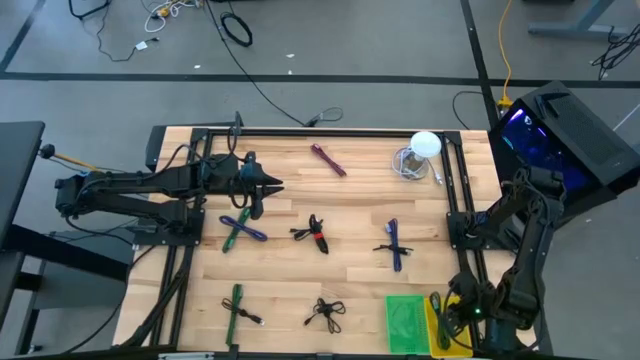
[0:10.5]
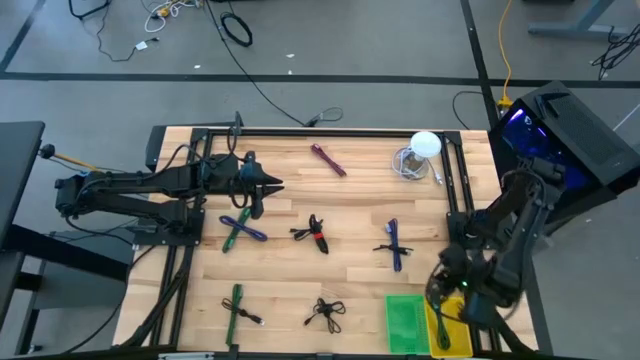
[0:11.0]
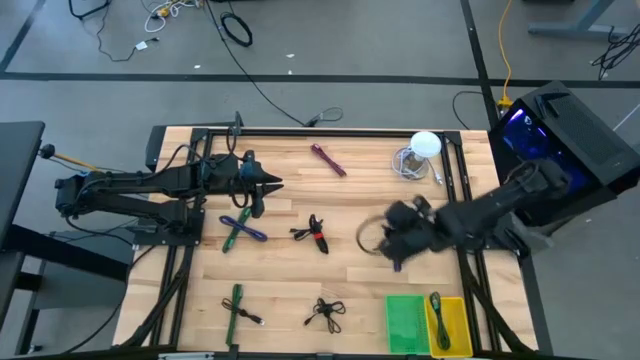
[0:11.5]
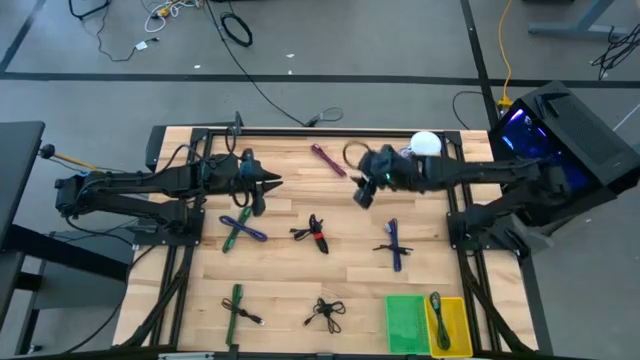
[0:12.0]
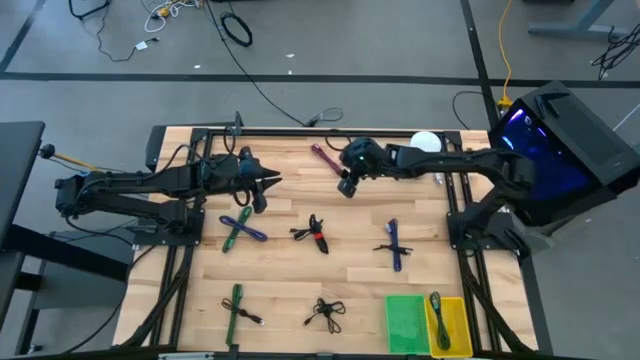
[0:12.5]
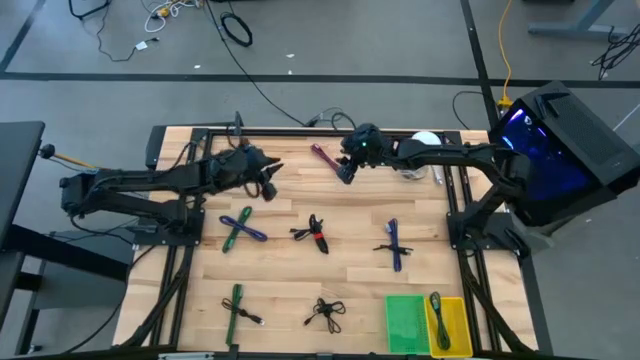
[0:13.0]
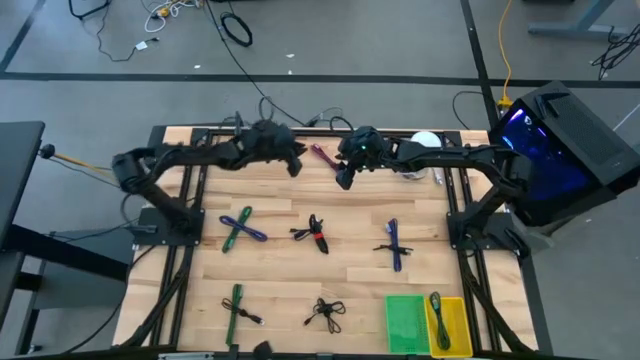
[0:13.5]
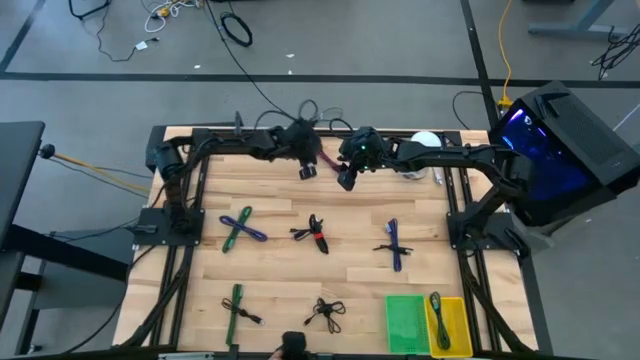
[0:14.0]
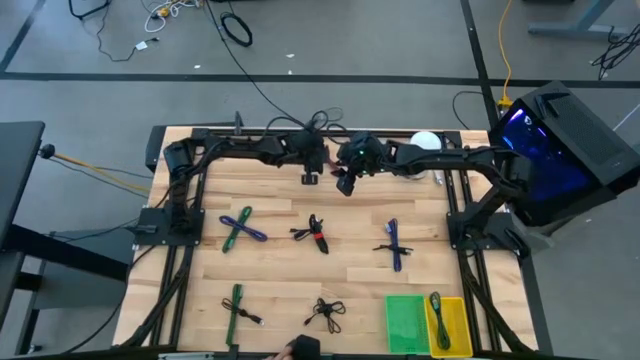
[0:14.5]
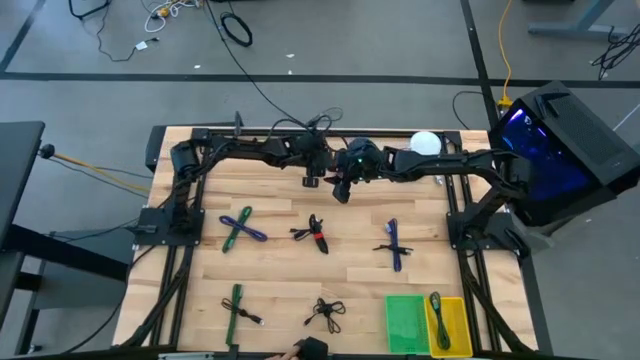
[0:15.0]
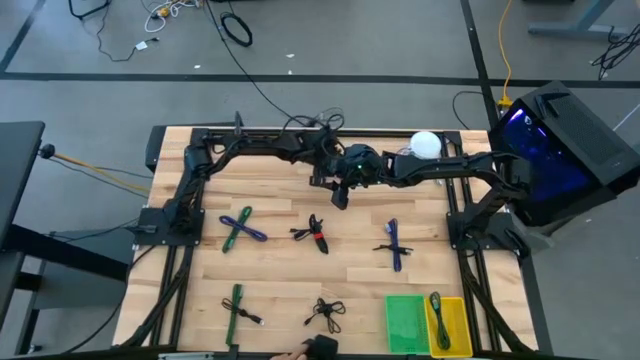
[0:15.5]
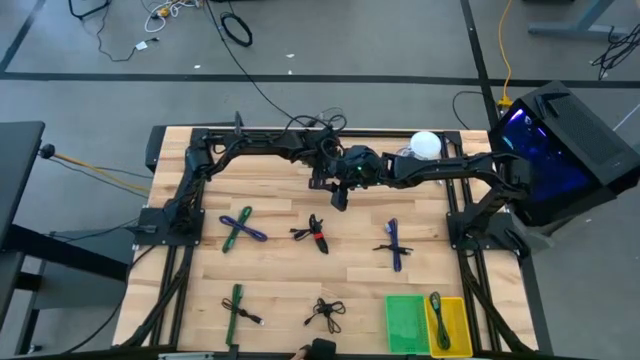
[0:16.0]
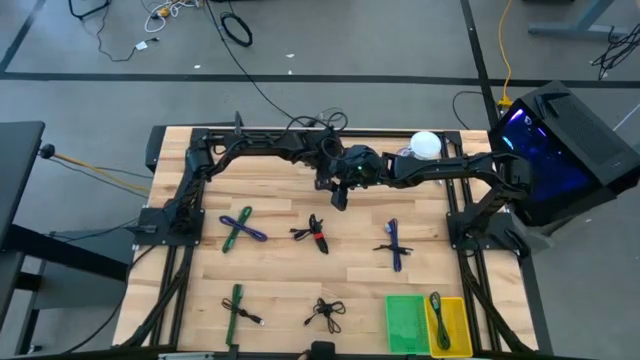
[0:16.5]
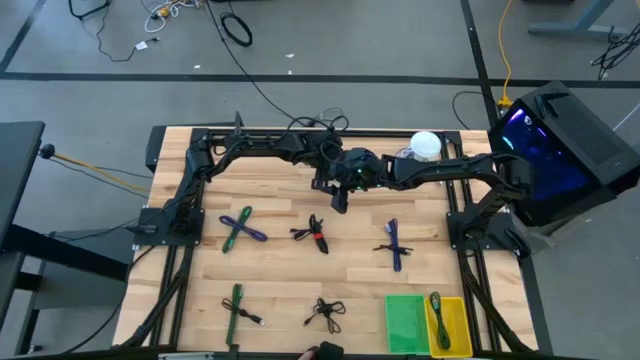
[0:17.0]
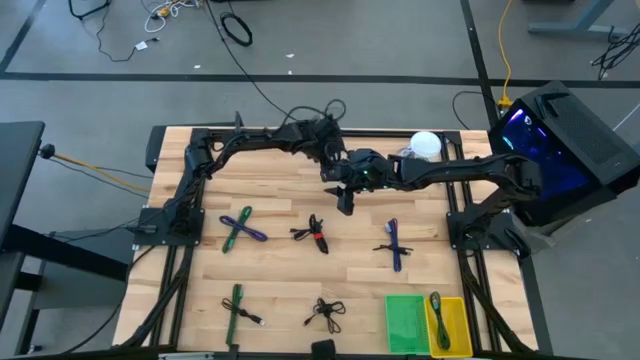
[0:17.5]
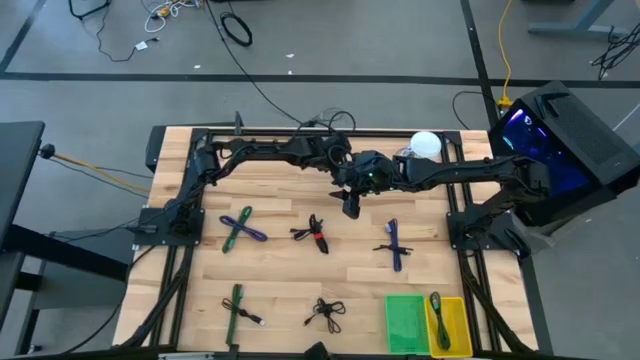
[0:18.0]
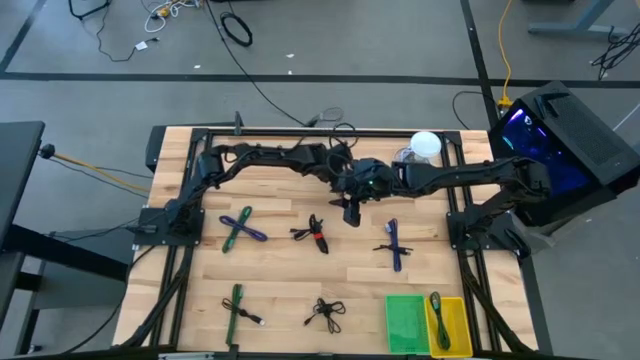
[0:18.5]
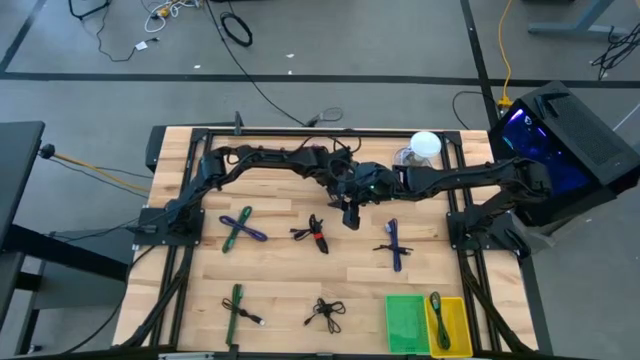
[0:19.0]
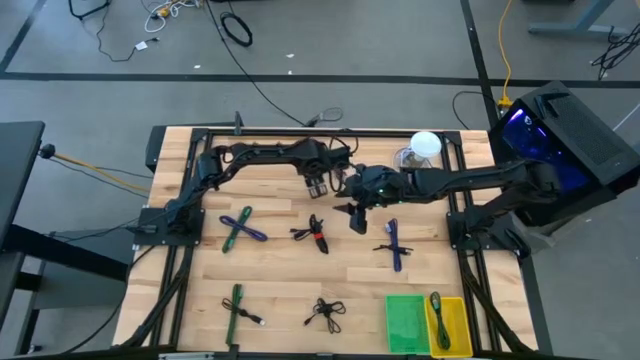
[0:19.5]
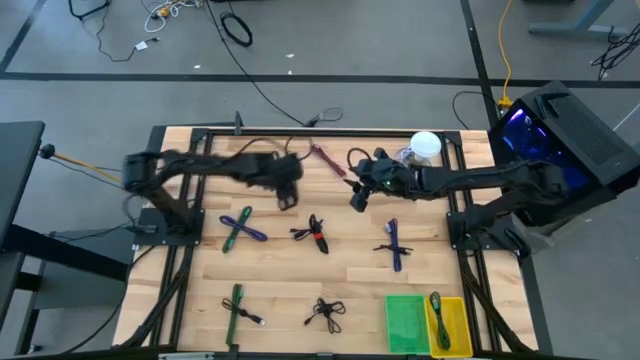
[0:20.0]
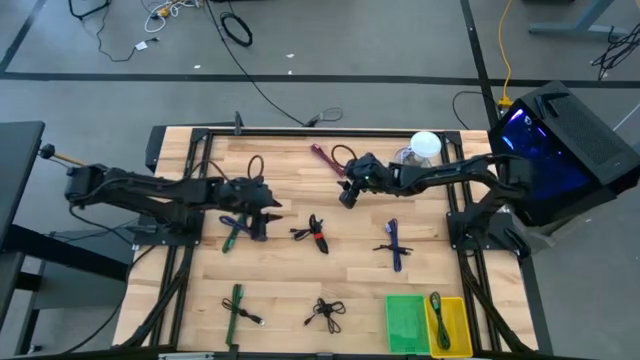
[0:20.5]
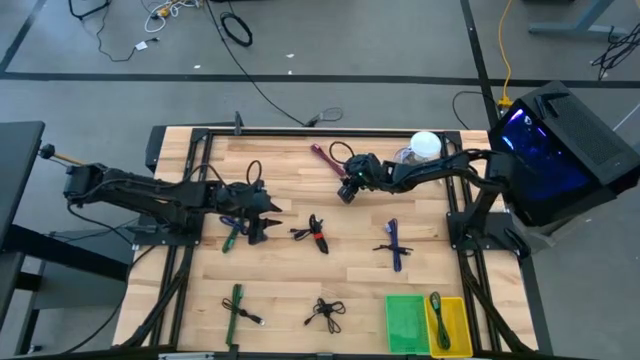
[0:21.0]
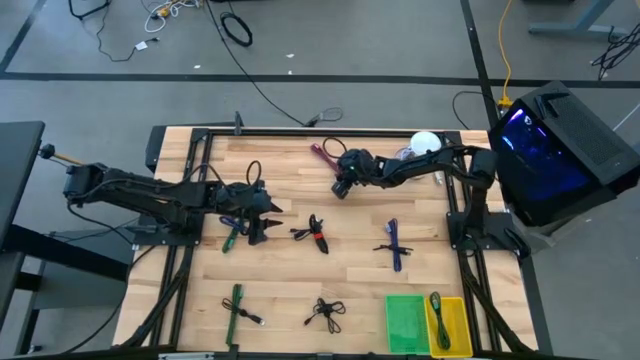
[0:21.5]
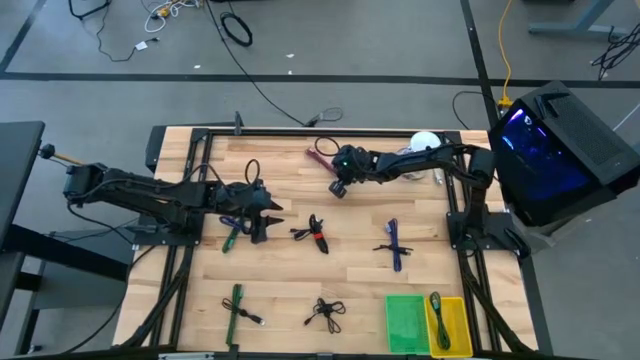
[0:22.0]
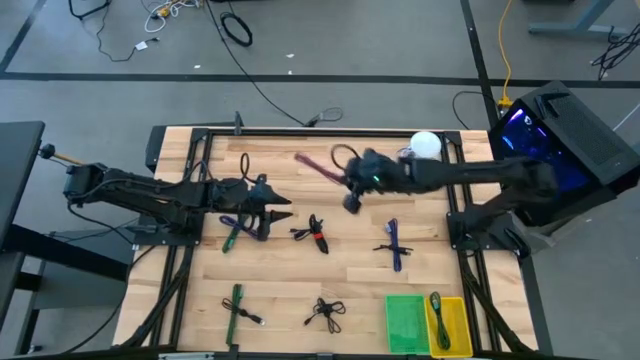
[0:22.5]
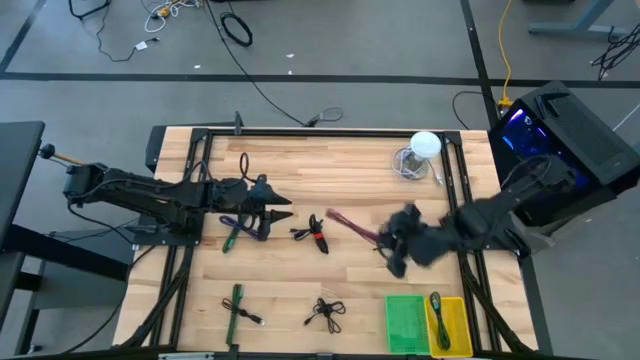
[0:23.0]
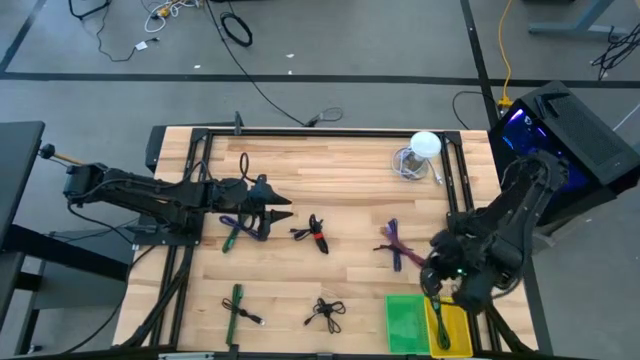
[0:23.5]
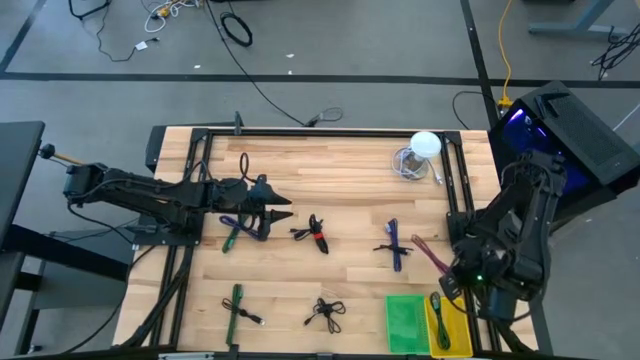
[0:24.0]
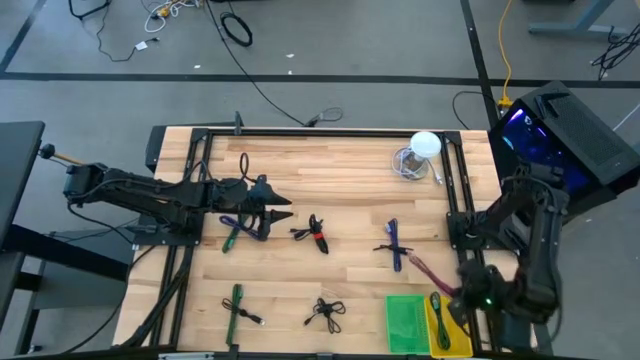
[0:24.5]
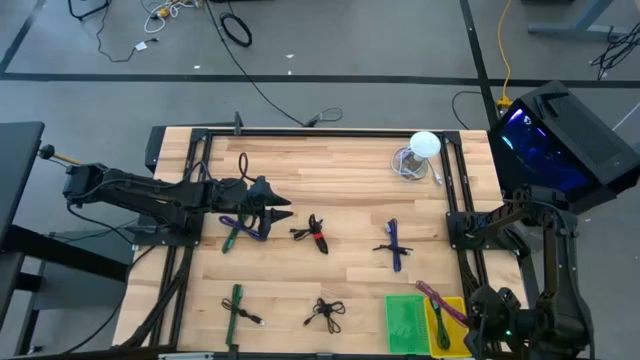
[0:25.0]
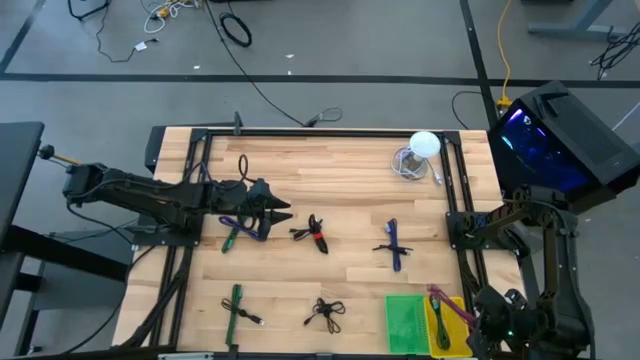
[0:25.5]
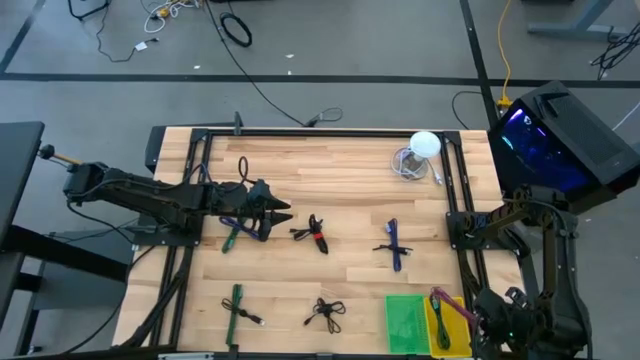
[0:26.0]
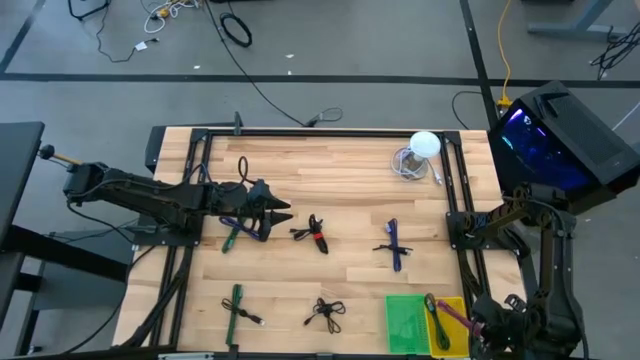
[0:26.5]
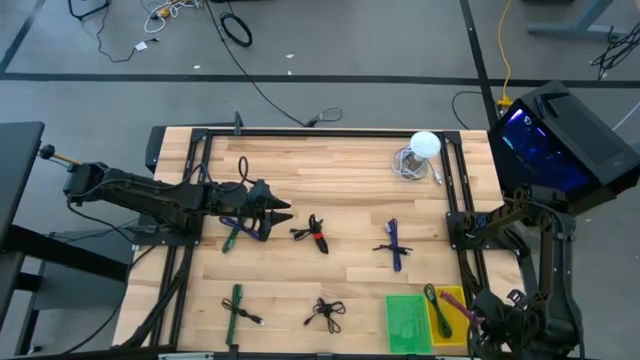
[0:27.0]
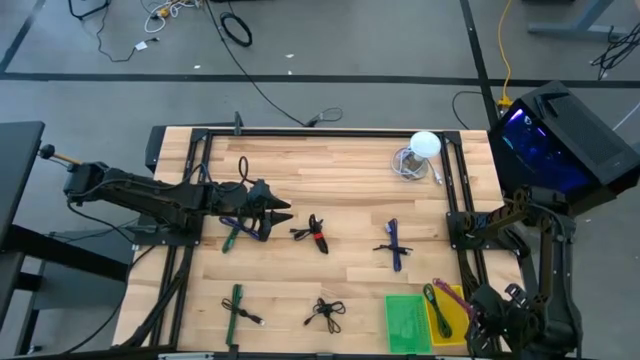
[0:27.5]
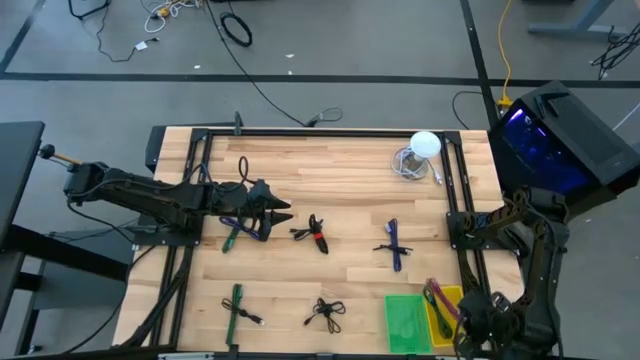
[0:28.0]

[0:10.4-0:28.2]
Task: Pick & Place USB Port
Put the red and black charger cable into the yellow basket

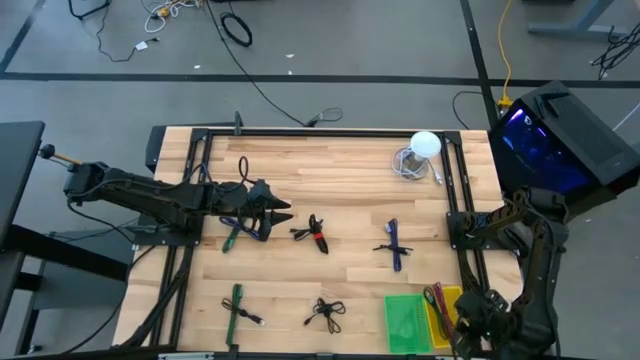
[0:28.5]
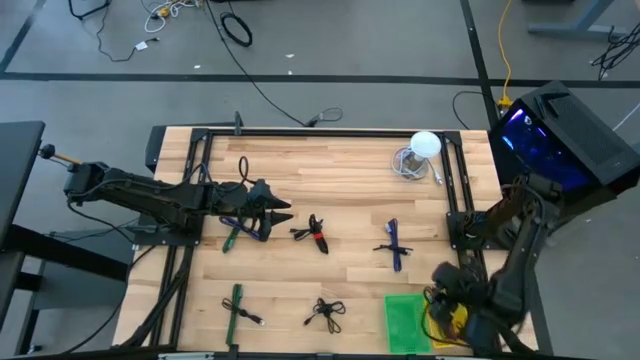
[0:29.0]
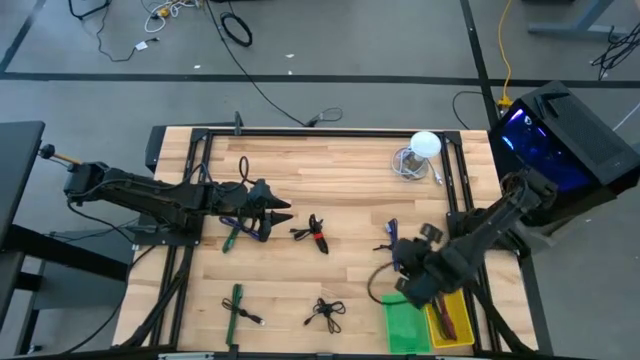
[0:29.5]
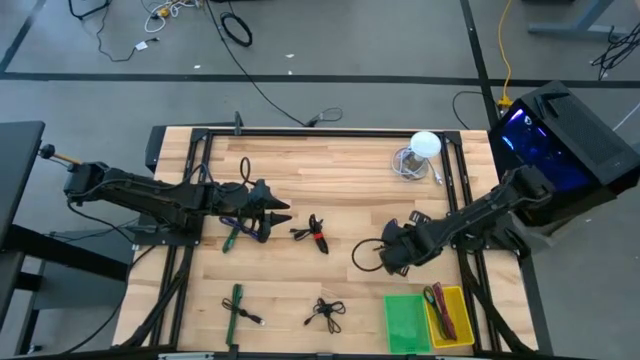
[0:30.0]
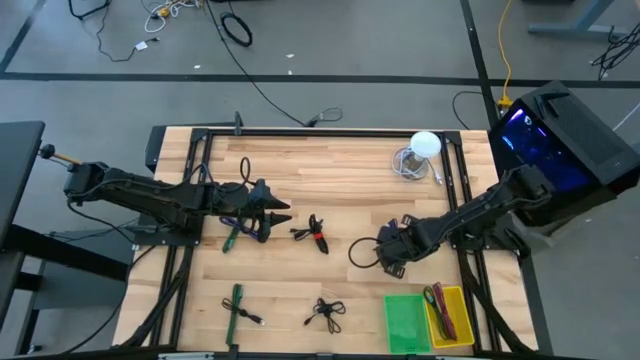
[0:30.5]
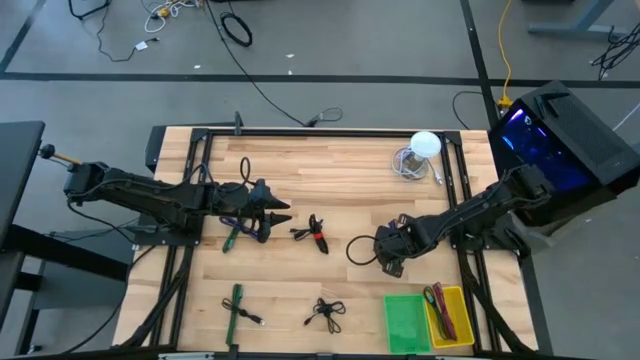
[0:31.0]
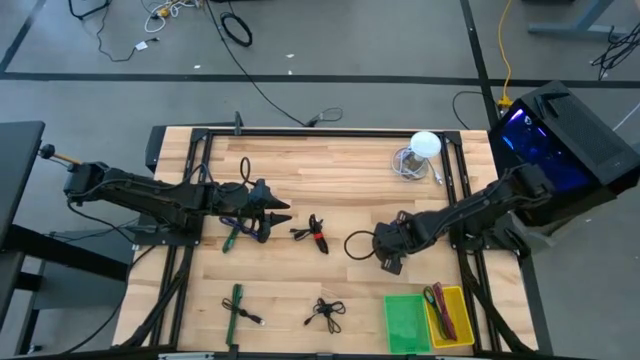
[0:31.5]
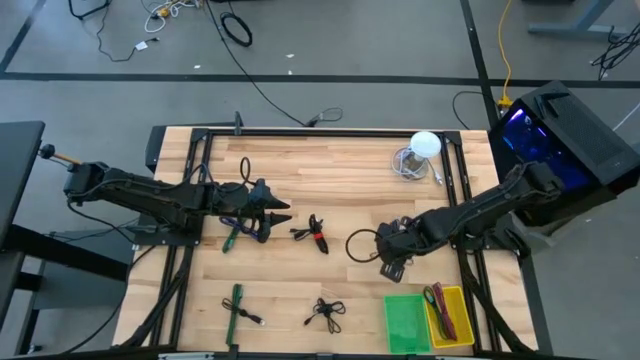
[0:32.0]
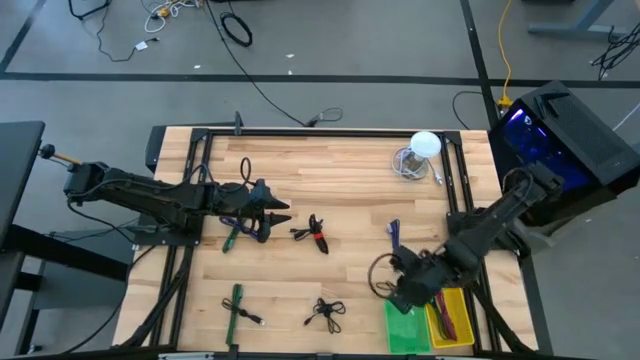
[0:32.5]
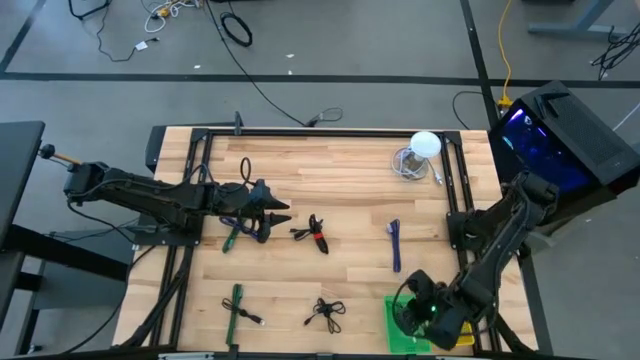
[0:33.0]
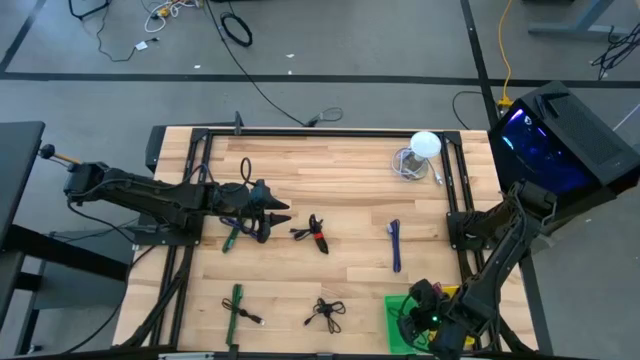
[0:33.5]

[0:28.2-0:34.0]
Put the black charger cable into the green basket
